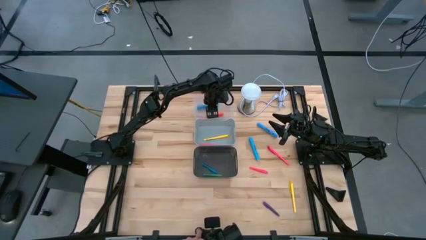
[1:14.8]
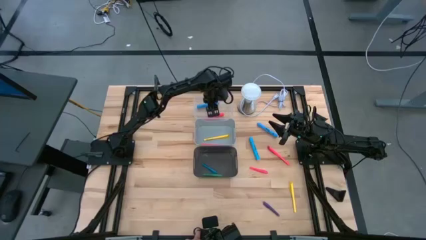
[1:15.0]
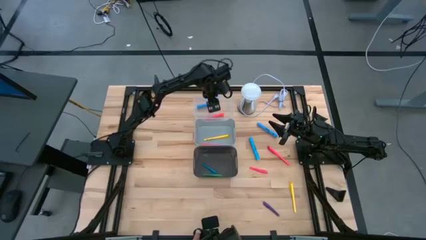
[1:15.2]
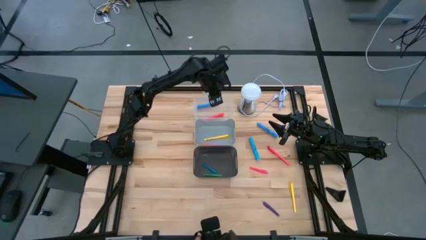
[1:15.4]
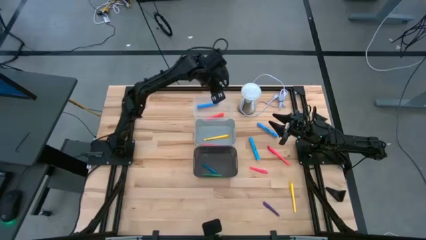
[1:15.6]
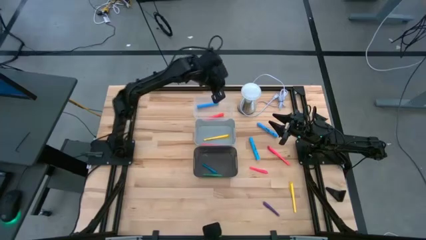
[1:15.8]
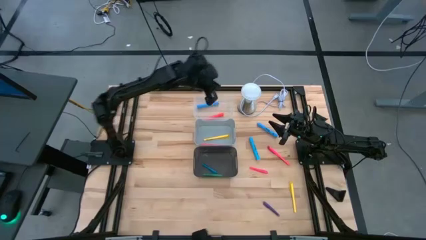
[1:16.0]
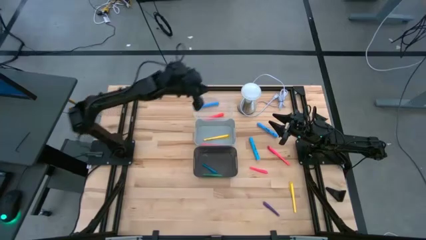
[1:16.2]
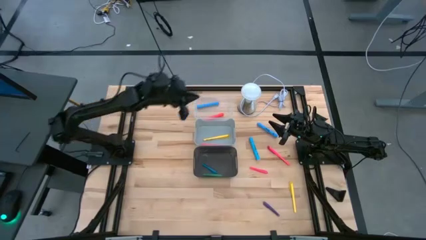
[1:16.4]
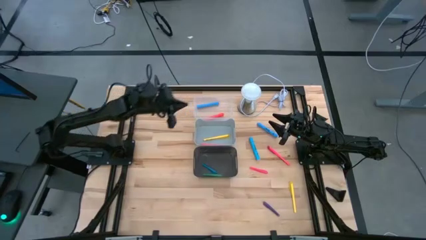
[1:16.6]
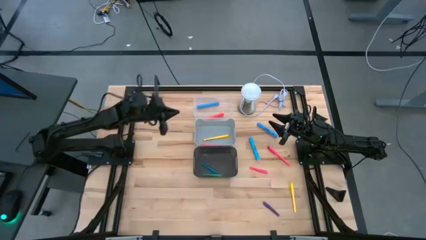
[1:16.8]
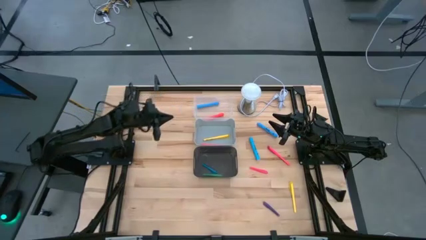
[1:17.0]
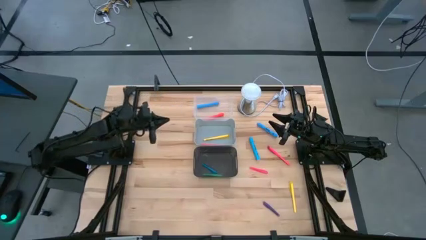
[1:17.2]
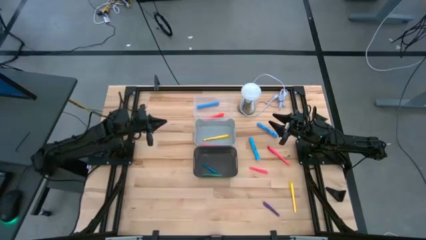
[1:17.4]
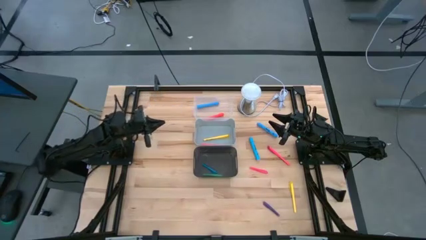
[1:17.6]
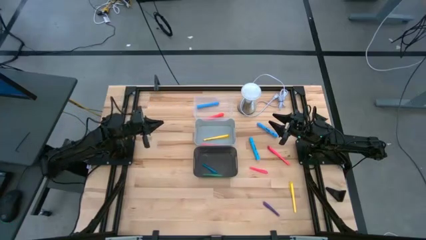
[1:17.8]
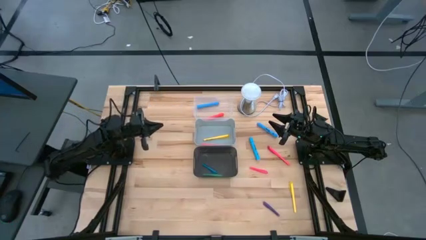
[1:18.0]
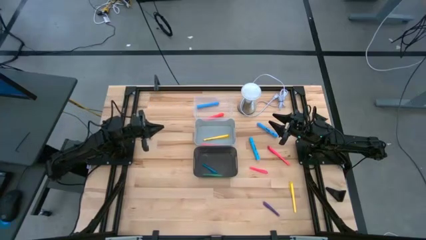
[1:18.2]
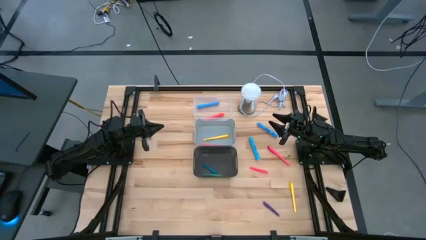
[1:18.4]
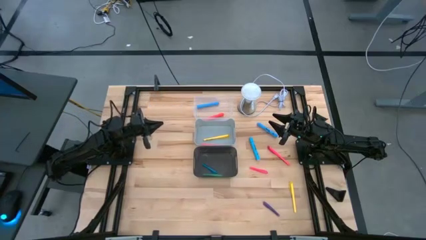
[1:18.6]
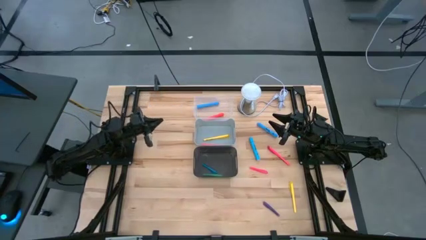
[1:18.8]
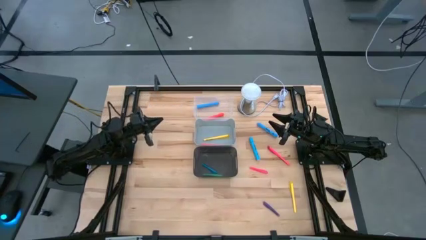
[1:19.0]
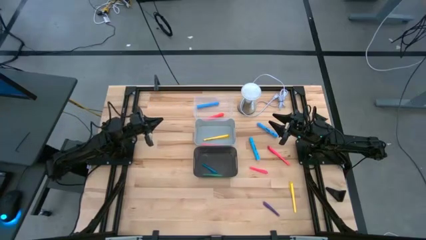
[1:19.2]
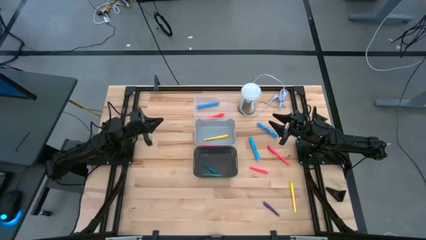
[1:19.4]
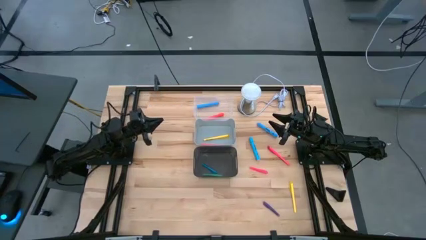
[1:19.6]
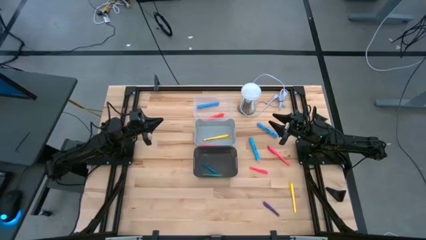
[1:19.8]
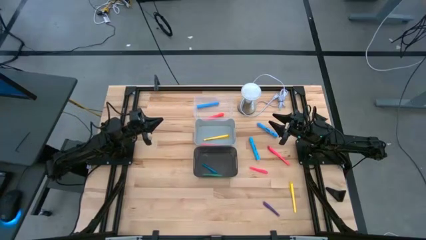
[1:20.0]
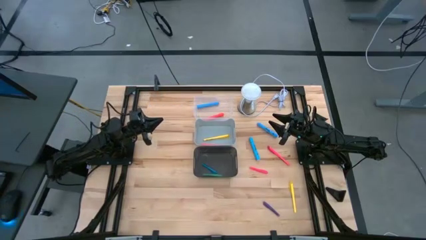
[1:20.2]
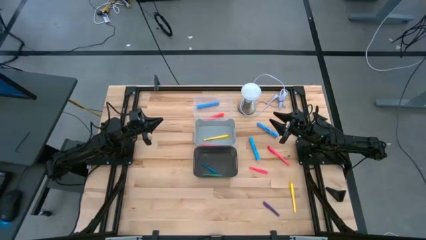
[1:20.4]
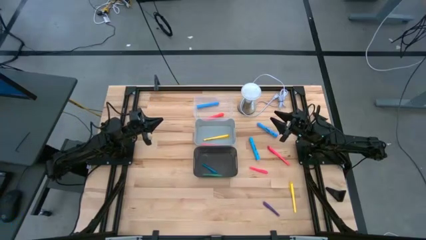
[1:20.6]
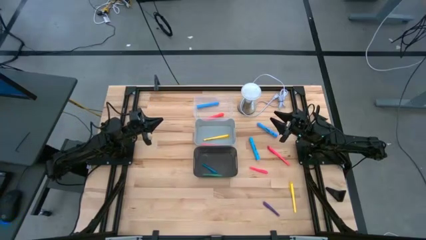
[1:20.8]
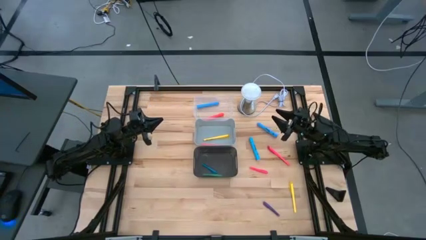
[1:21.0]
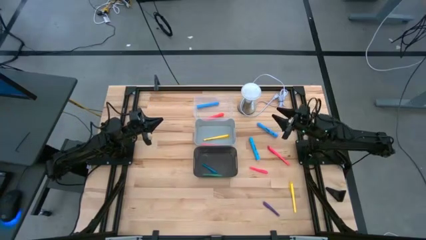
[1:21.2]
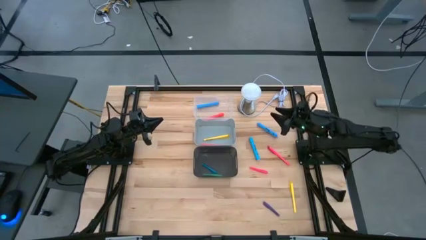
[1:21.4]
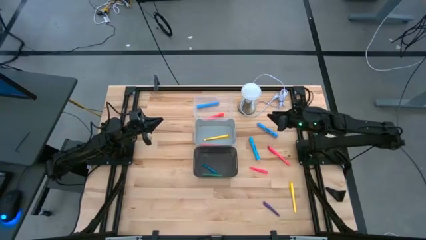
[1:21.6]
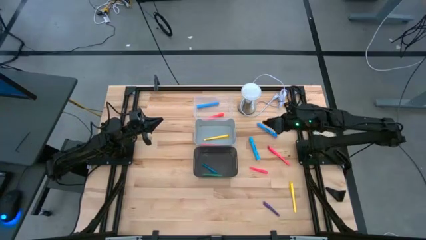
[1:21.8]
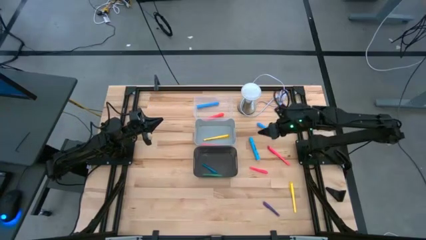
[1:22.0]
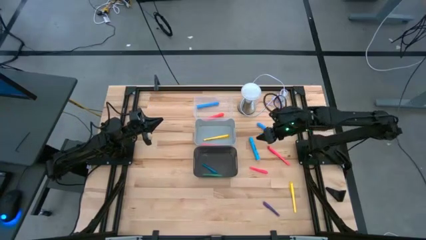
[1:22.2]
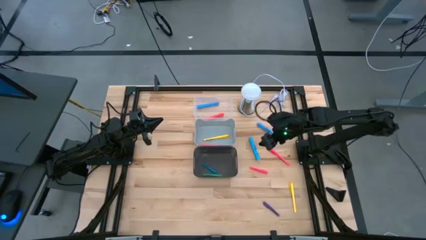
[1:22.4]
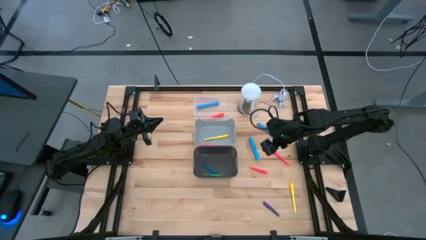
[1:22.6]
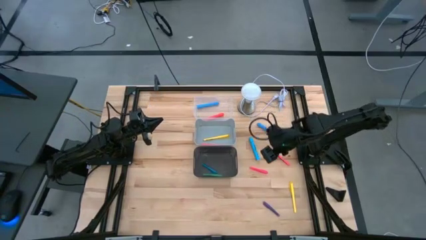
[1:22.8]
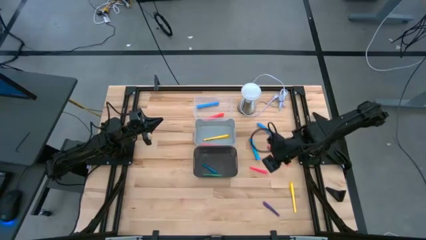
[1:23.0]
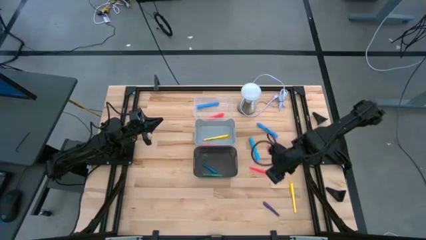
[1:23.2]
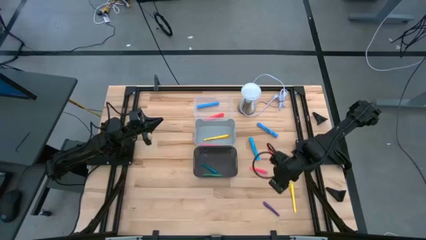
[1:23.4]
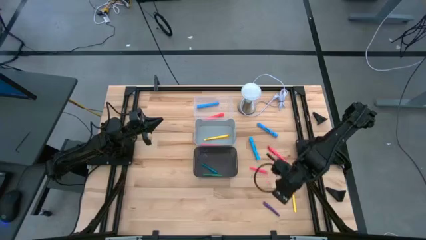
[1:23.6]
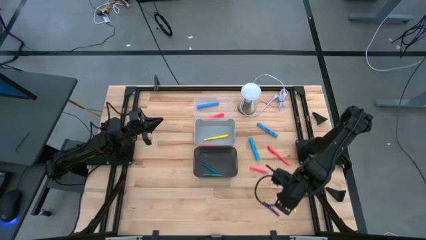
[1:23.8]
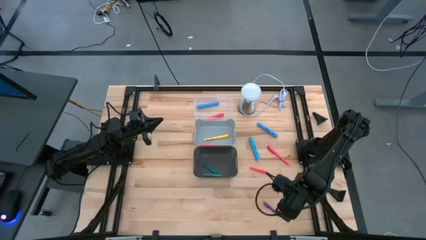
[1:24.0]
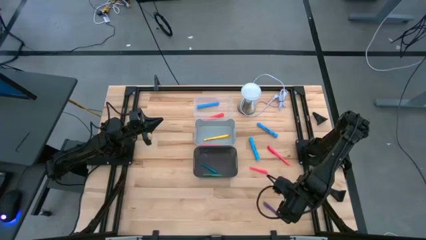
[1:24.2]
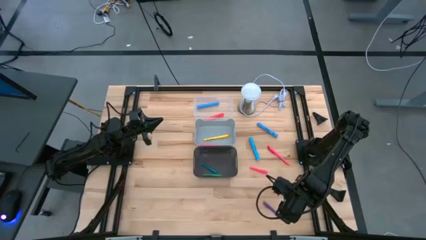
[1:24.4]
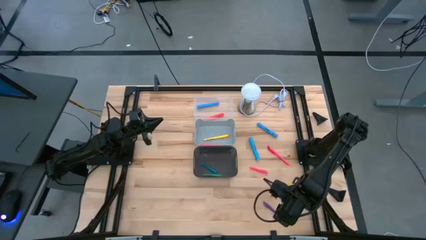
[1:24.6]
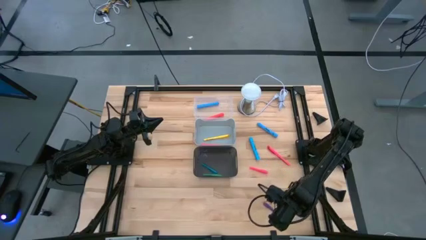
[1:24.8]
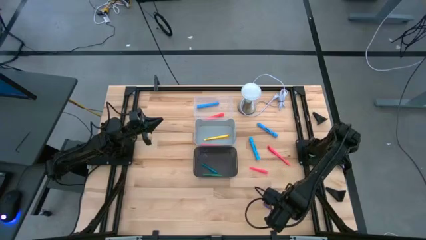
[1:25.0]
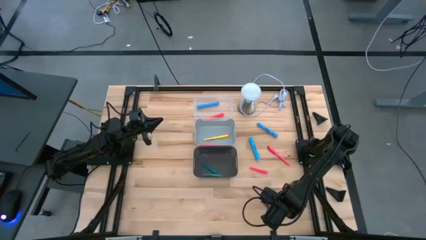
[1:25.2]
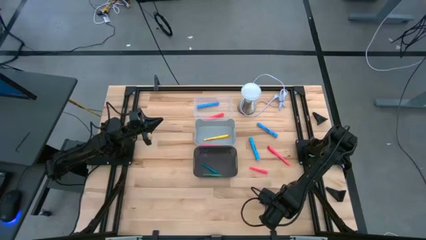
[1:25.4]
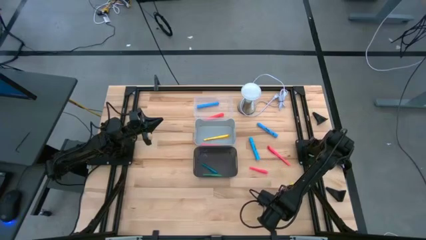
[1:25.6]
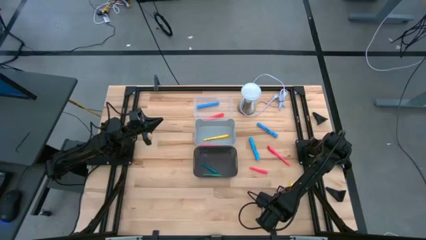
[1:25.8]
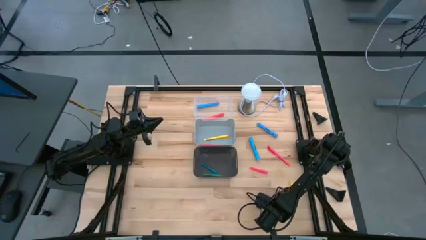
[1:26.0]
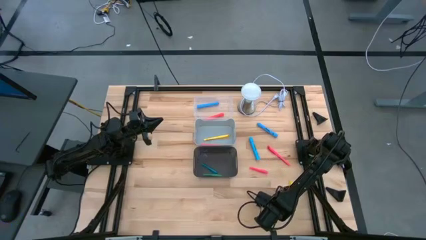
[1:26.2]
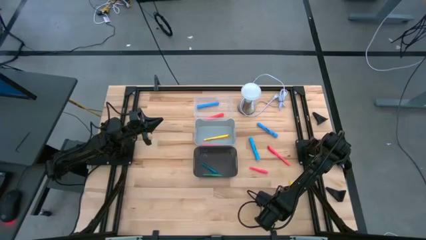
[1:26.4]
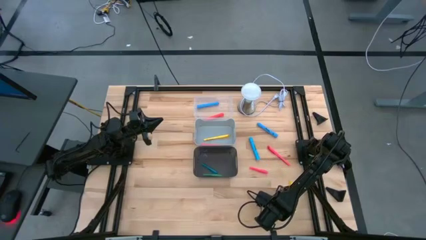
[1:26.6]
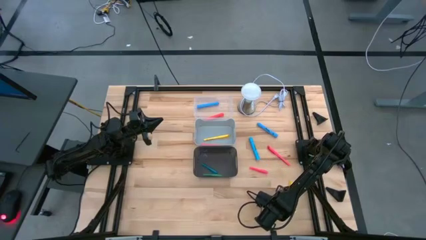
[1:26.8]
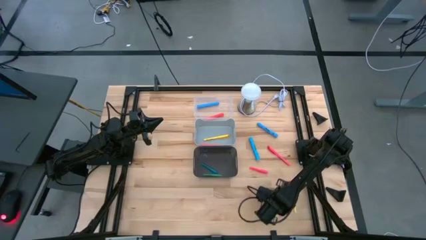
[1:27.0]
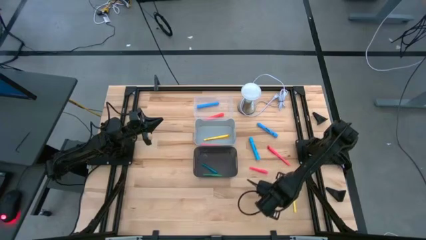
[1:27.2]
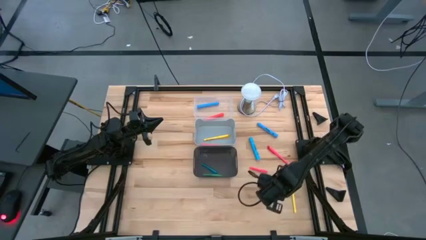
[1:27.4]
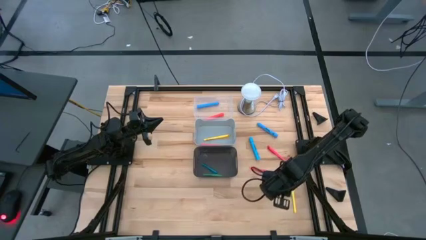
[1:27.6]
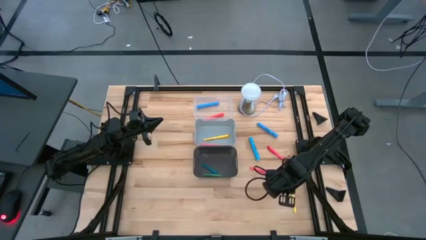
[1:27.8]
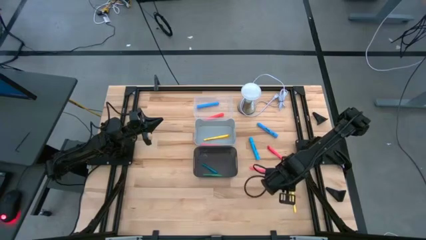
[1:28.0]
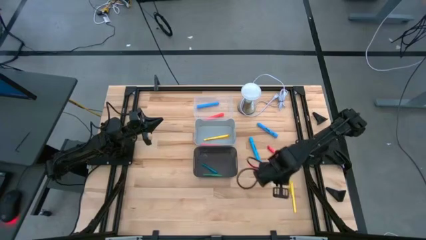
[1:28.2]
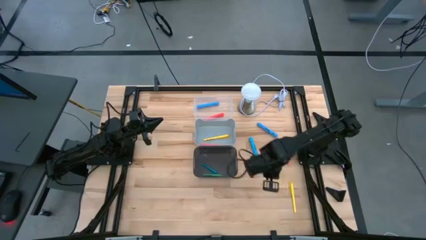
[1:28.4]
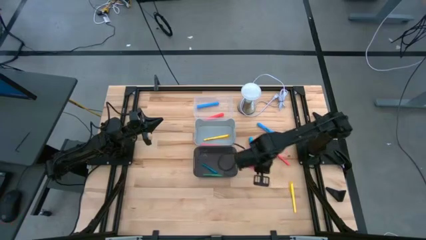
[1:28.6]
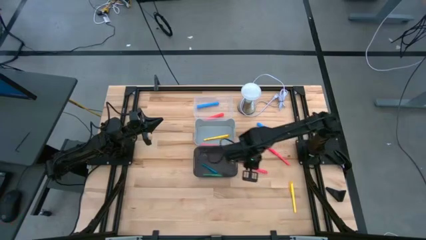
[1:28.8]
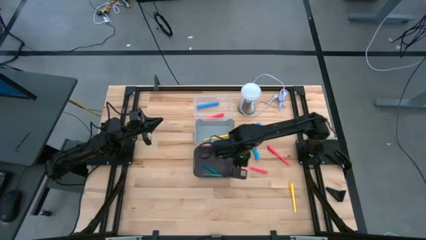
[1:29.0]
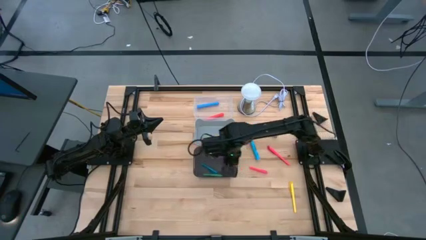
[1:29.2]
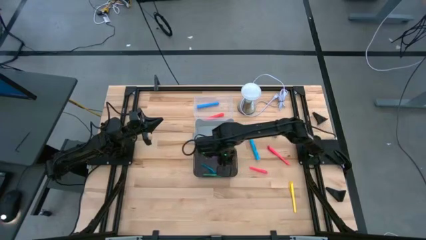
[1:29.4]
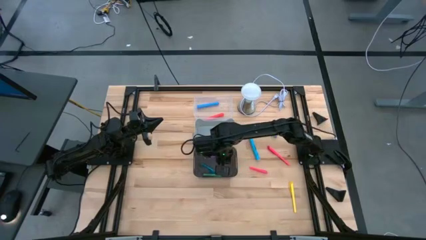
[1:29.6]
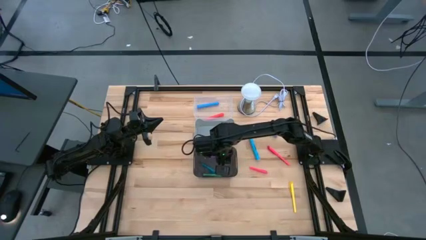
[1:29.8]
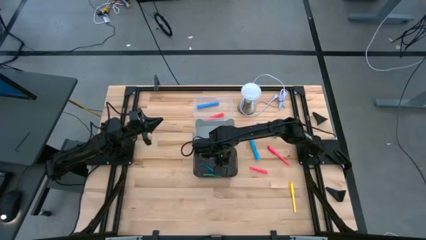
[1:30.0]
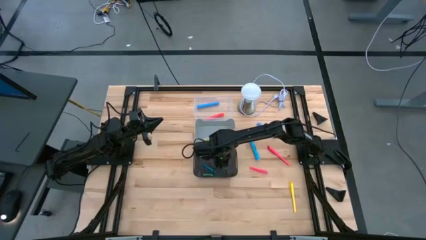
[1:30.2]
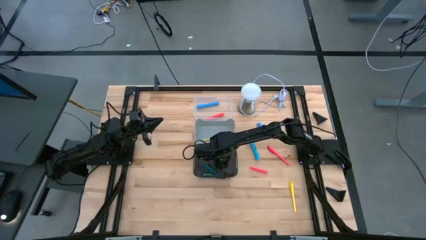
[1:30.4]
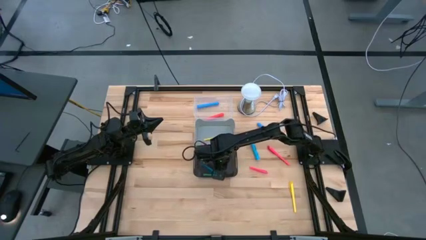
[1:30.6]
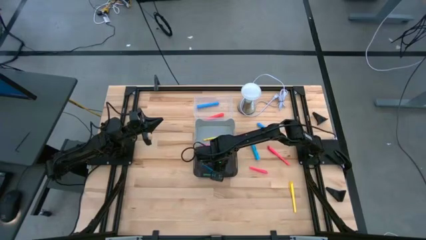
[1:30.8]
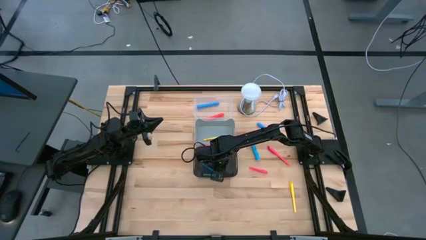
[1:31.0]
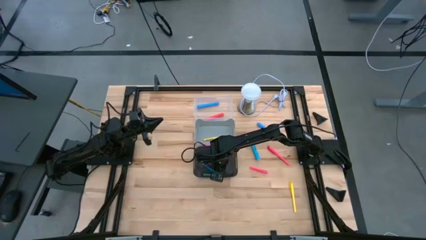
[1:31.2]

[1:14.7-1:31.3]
Task: Pick & Place Markers
Put the purple pen into the black bin

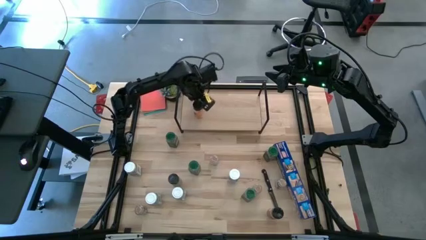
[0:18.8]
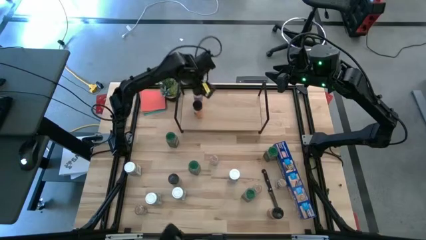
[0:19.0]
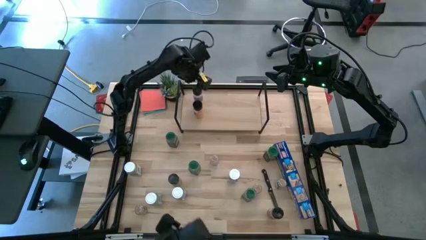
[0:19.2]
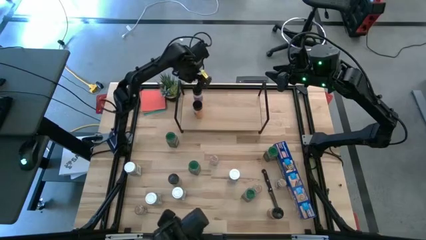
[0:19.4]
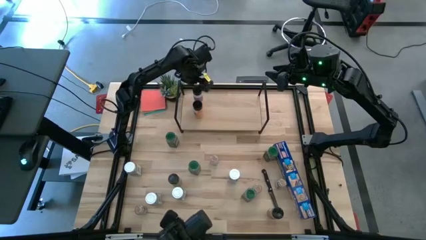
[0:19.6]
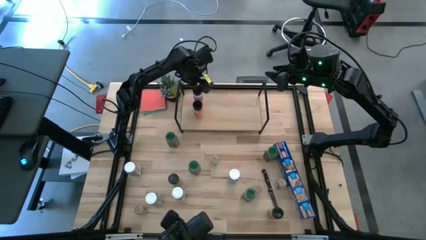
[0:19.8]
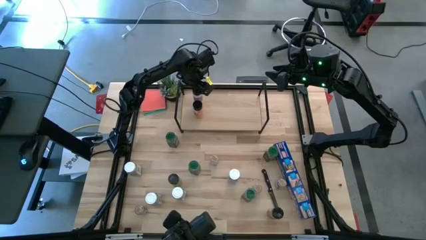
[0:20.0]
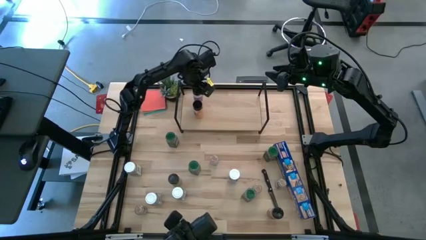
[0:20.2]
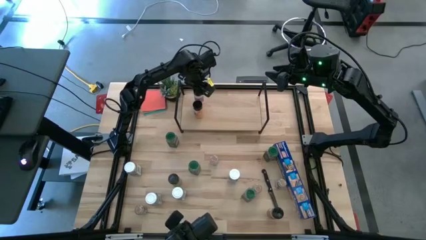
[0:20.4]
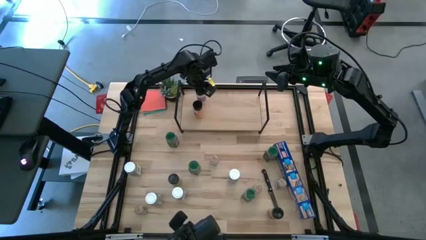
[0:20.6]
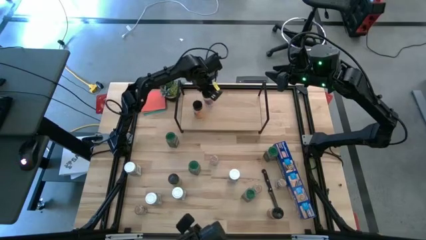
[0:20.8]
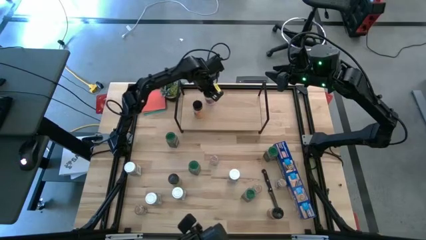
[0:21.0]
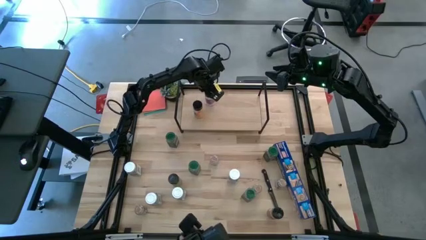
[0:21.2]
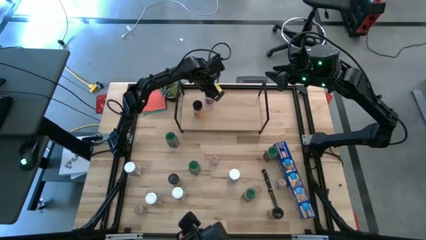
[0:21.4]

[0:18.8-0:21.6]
Task: Shelf spices
Move the top black seasoning bottle to the top center on the shelf
